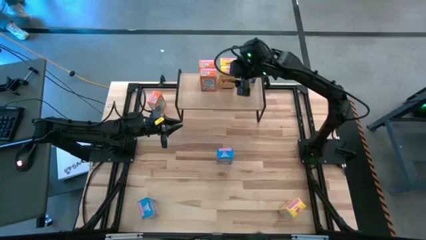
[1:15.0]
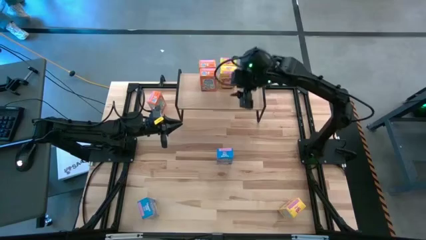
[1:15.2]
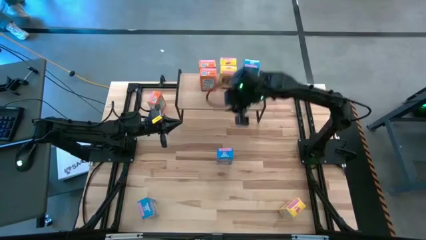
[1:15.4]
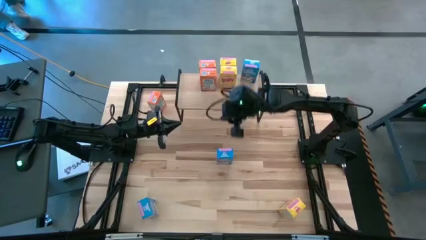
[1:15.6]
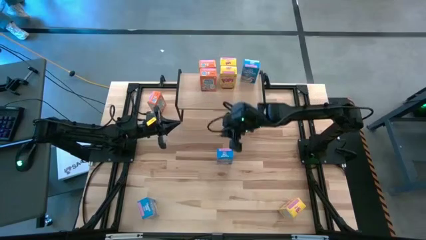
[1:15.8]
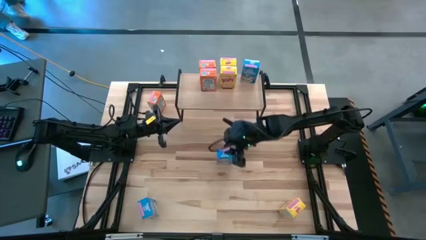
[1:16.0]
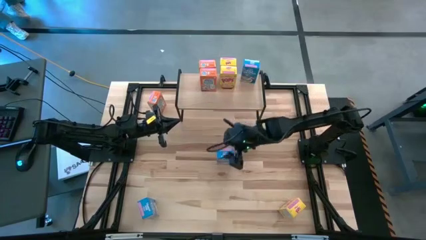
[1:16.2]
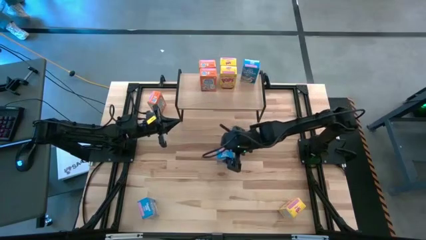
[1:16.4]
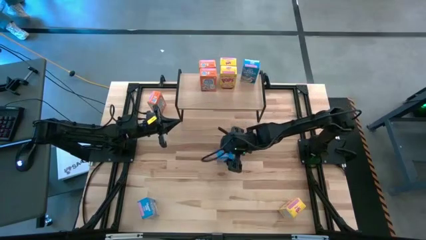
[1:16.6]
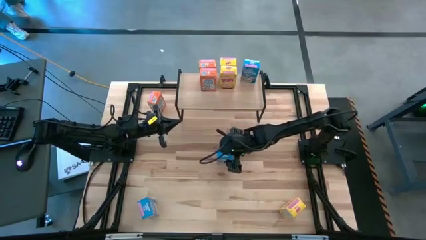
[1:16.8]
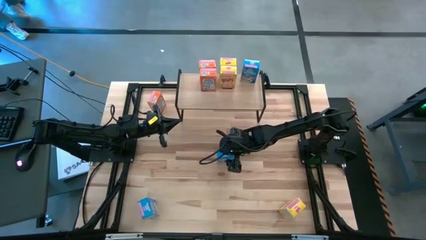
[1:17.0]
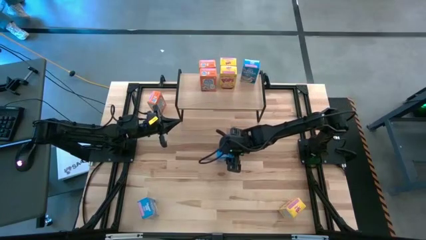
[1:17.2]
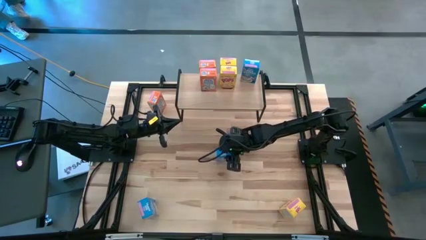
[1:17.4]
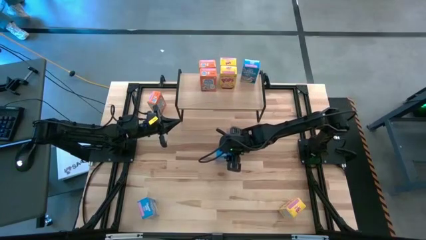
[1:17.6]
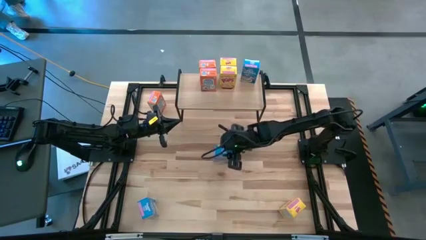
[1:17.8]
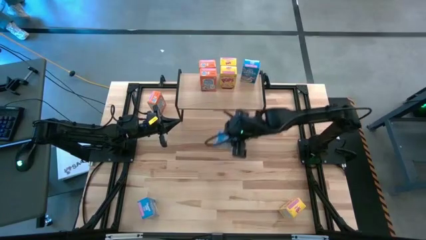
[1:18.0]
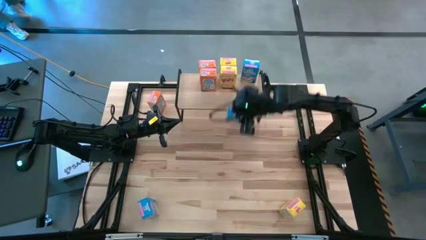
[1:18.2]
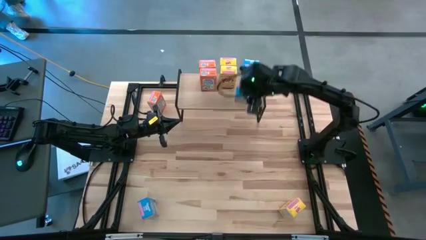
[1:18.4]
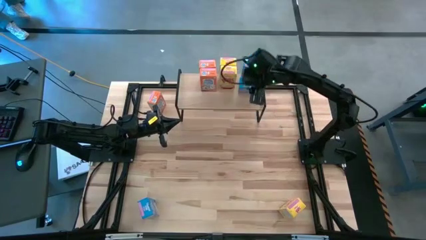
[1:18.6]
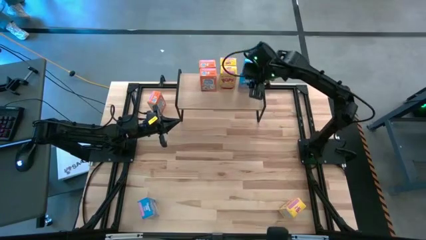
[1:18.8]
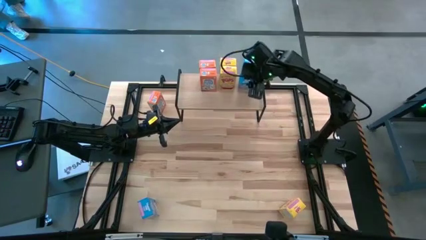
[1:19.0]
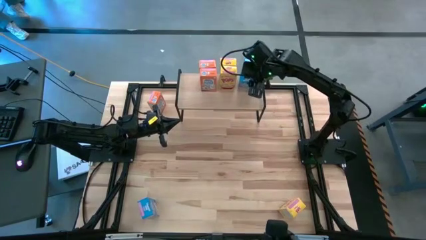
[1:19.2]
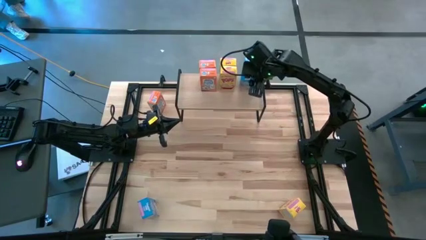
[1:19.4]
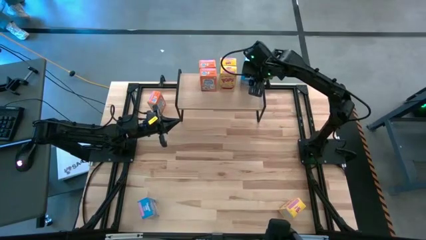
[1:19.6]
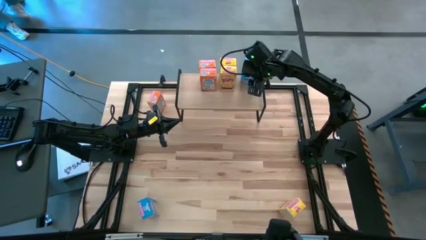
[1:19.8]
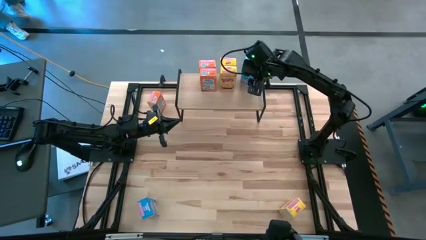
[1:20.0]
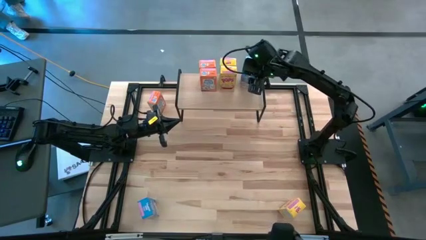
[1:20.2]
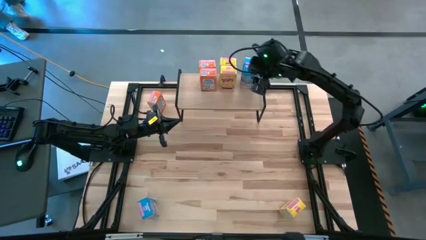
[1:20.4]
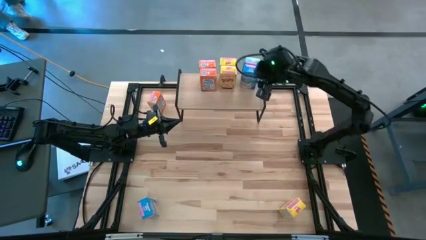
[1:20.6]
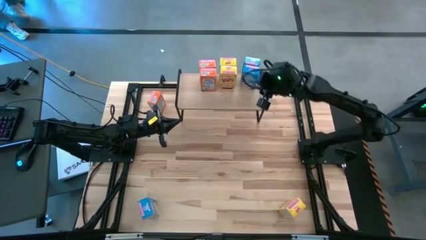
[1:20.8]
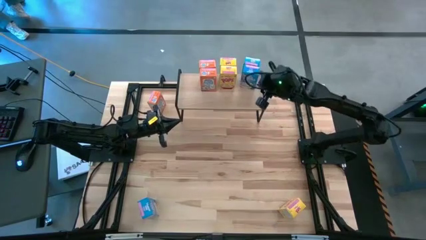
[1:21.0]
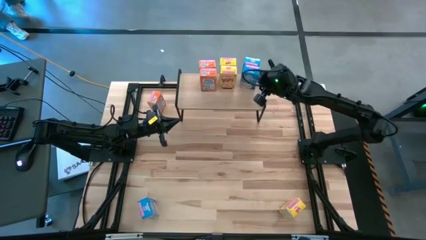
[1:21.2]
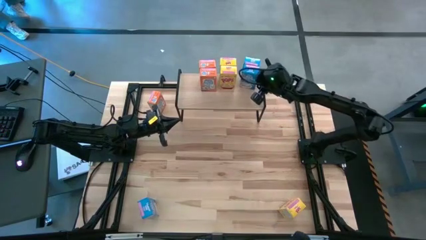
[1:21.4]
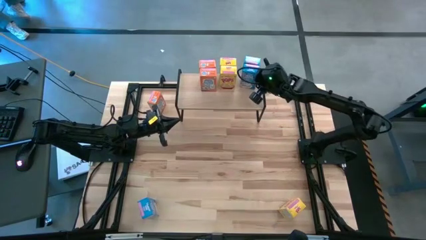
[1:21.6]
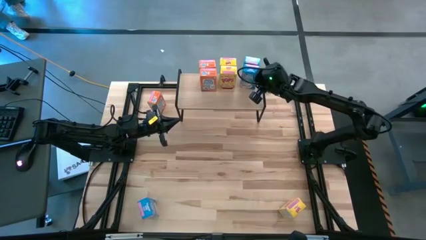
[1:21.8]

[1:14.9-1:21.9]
Task: Stack cereal on shelf
Put the top blue cereal box on the shelf aligned with the other blue cereal box

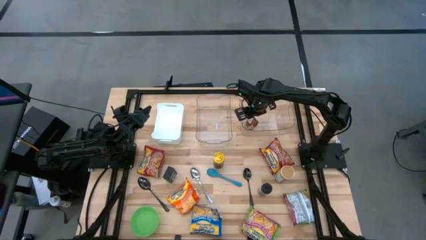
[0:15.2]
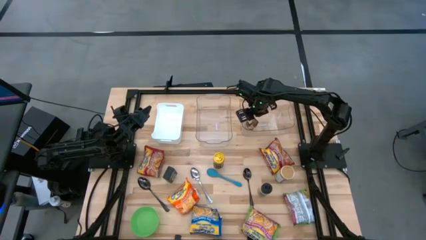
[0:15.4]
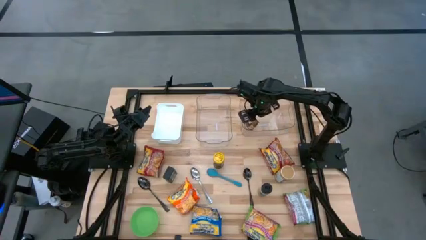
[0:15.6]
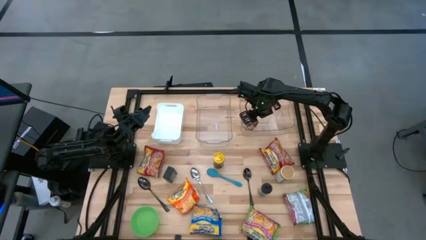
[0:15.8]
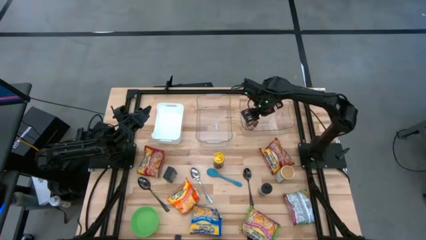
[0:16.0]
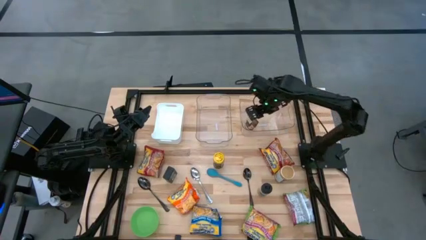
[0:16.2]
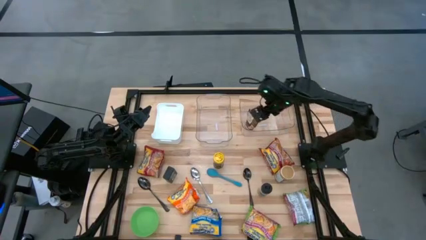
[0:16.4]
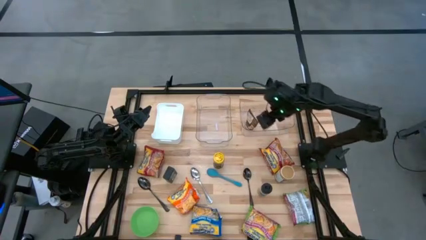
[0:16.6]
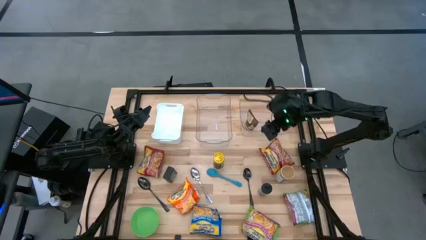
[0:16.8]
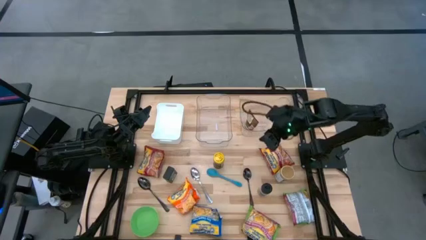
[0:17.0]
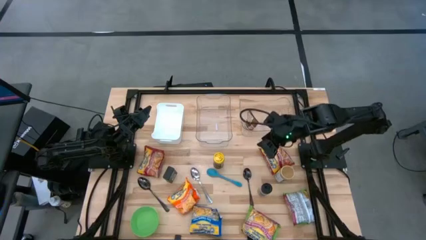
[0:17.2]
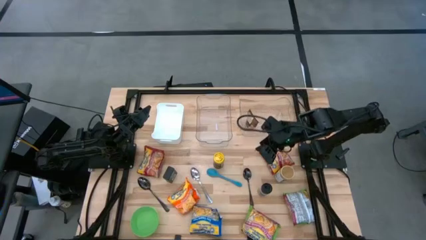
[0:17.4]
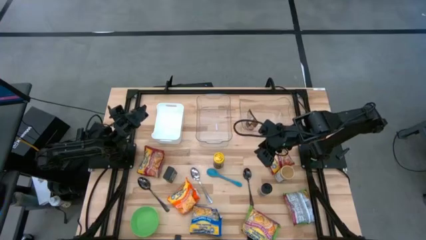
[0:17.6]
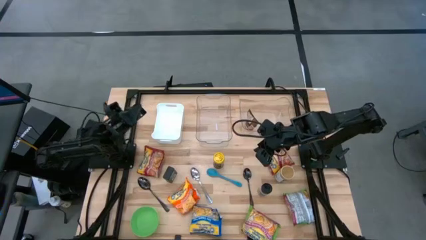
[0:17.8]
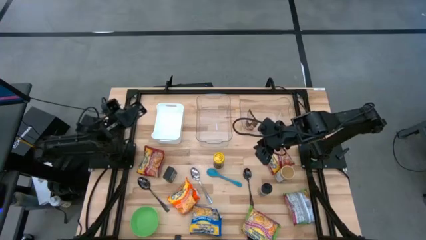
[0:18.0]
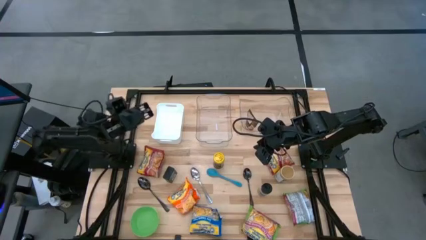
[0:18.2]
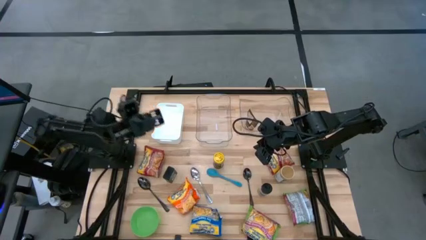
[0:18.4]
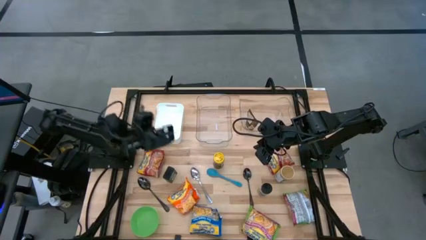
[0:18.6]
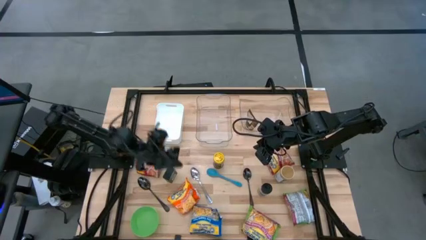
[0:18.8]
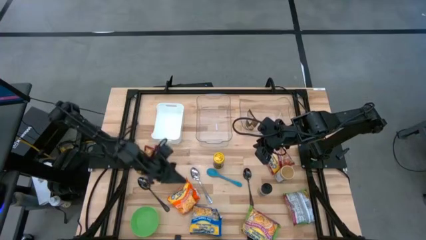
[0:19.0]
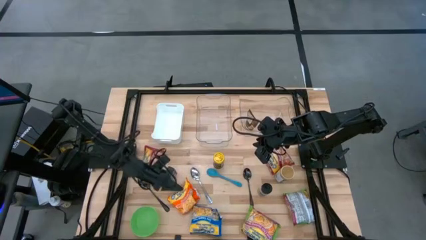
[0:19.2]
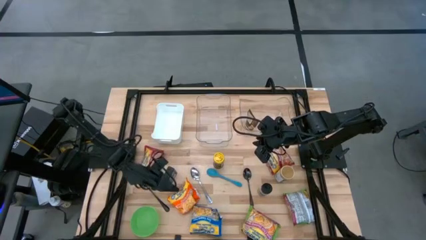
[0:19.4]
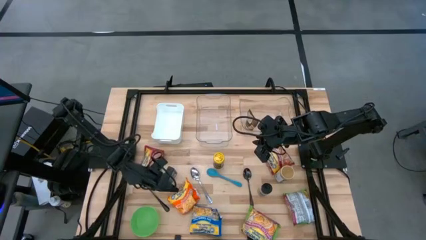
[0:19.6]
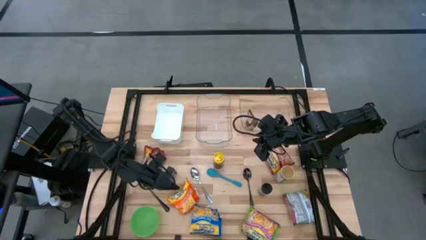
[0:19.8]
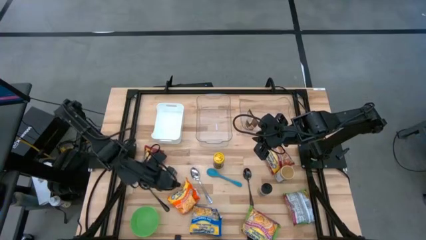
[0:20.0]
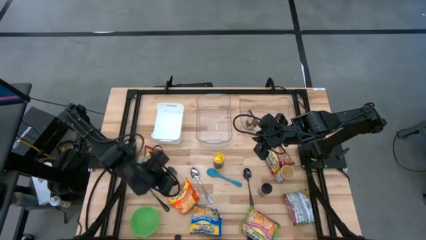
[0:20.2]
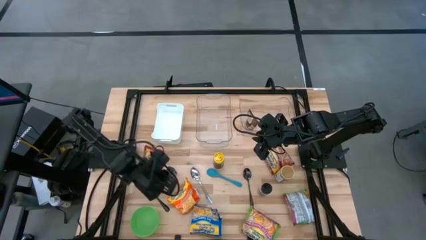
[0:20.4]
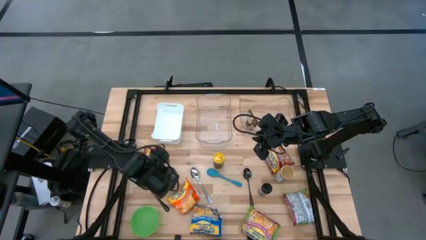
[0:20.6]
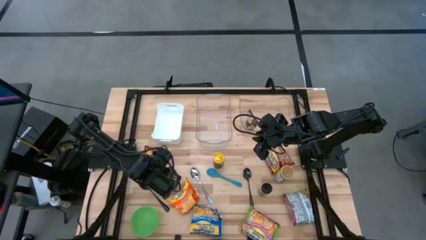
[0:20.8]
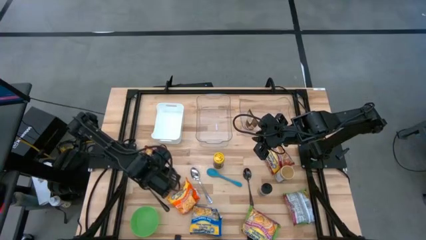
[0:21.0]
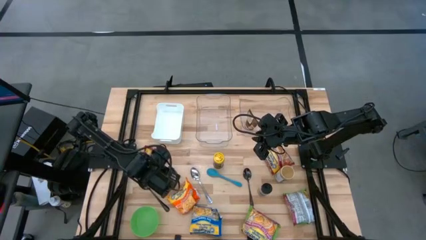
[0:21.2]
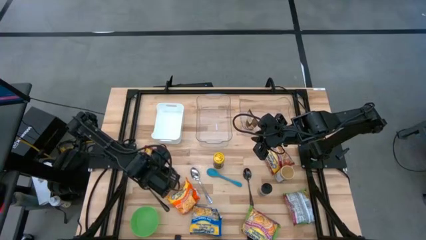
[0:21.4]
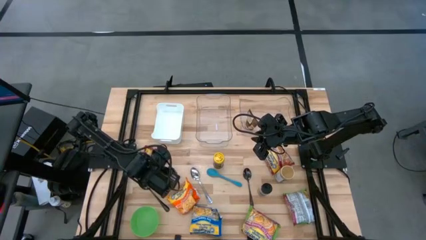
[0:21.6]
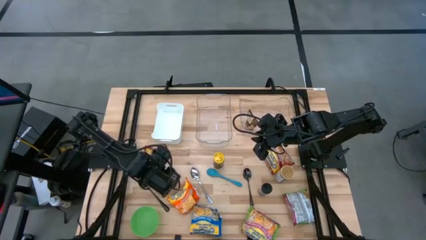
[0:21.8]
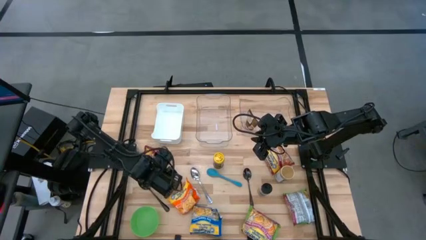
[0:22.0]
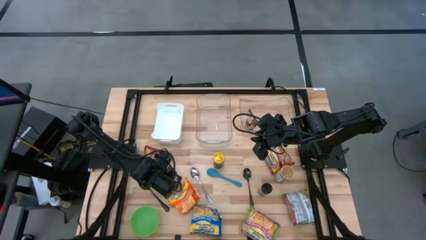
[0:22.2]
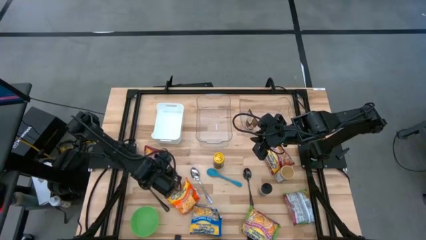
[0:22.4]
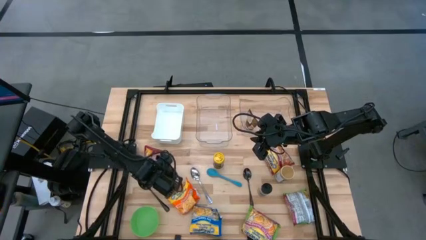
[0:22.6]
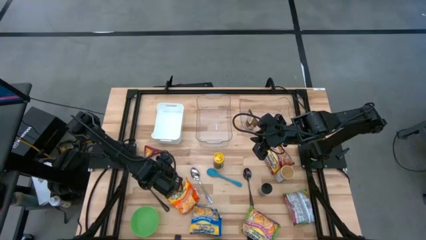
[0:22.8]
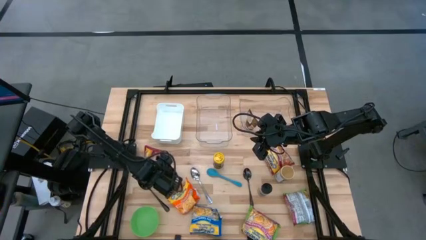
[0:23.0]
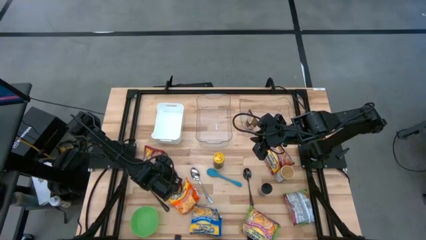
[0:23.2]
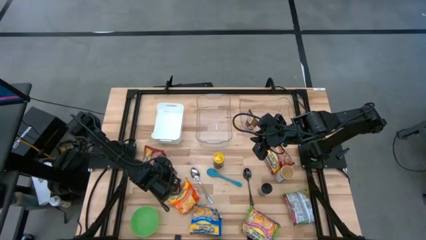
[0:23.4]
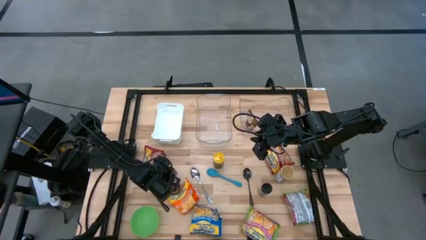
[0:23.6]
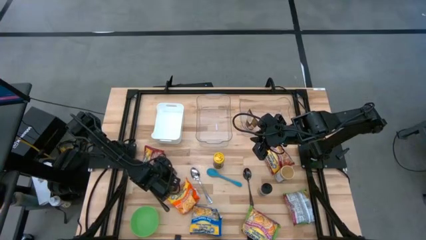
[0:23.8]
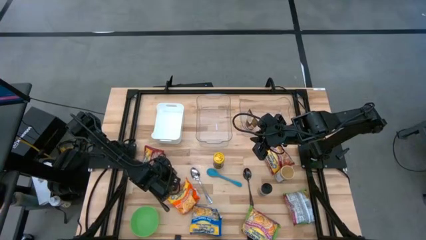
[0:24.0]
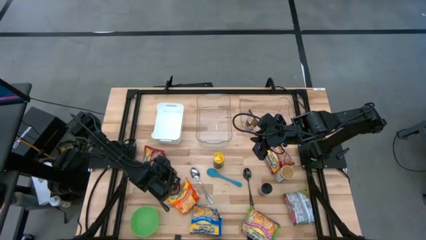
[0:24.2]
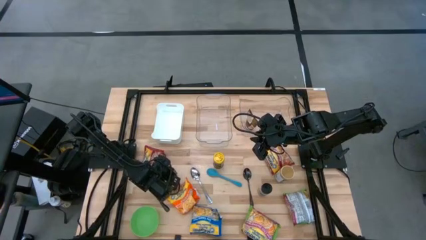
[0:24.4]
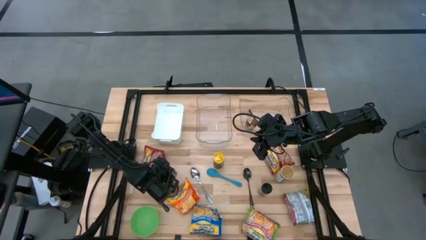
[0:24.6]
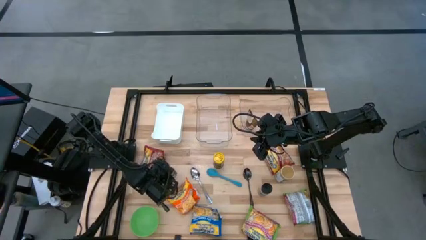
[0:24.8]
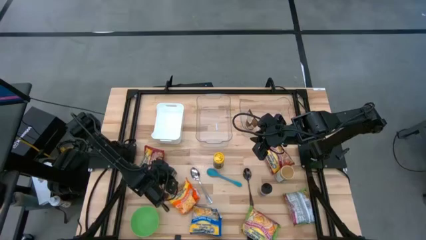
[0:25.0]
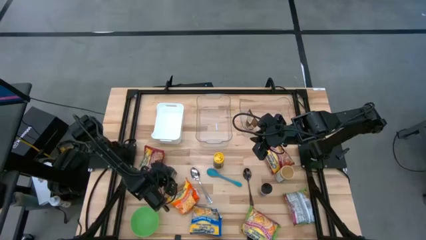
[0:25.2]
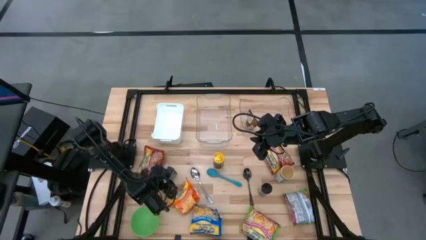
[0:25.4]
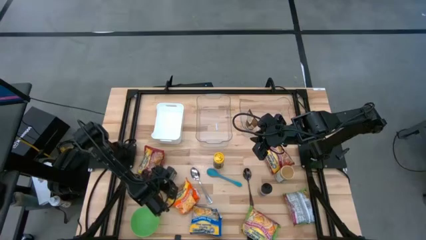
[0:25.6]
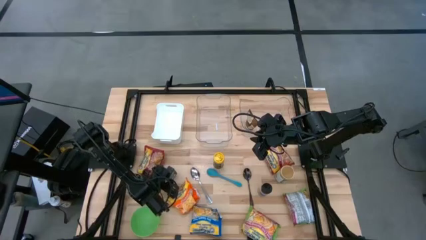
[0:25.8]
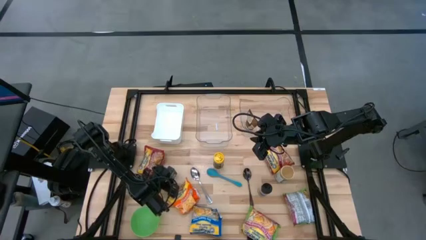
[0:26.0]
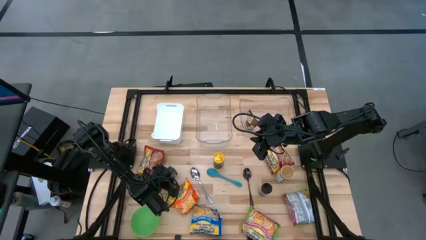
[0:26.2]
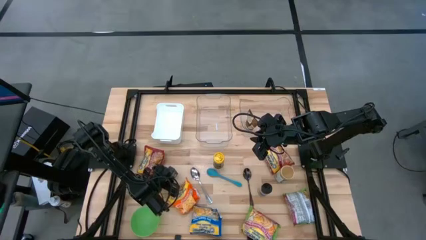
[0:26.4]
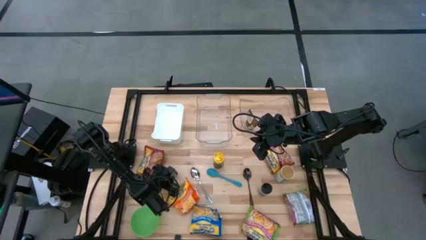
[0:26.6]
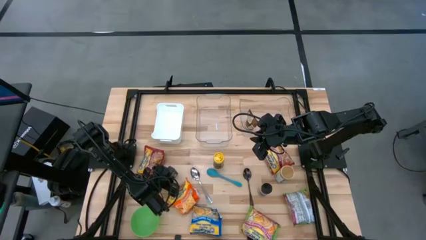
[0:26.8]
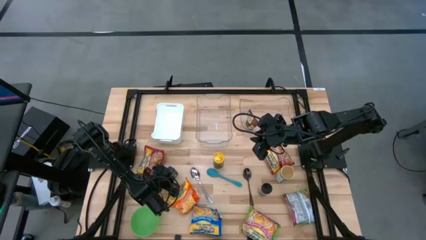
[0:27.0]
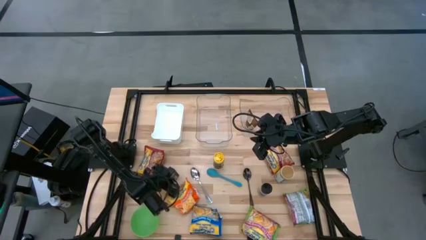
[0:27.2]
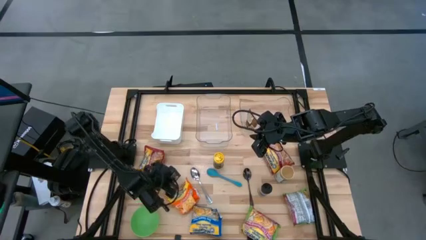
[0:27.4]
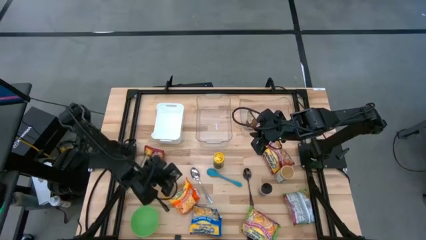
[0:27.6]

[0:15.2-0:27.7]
Task: Pick & Place Food Item
Put the black spice can into the right transparent bin
